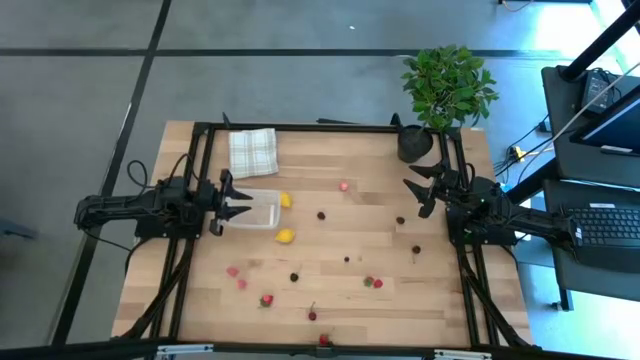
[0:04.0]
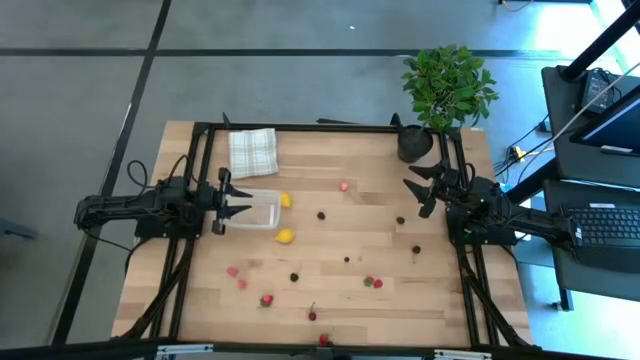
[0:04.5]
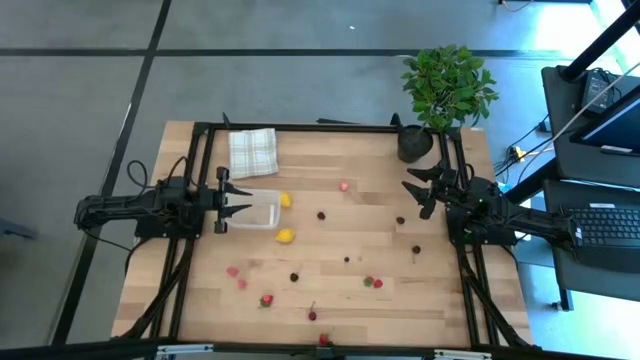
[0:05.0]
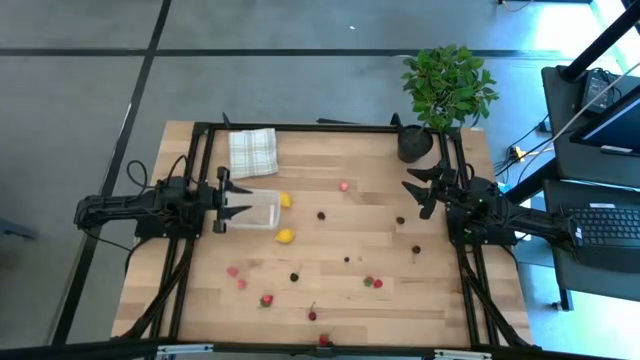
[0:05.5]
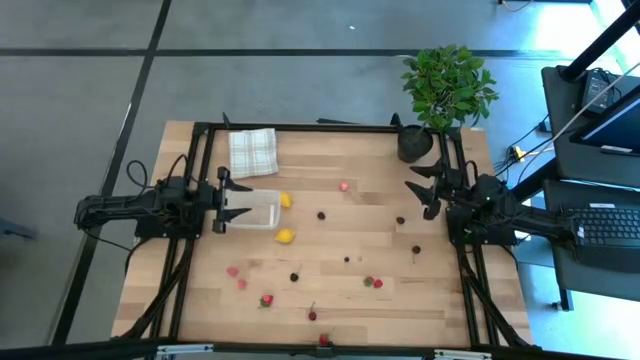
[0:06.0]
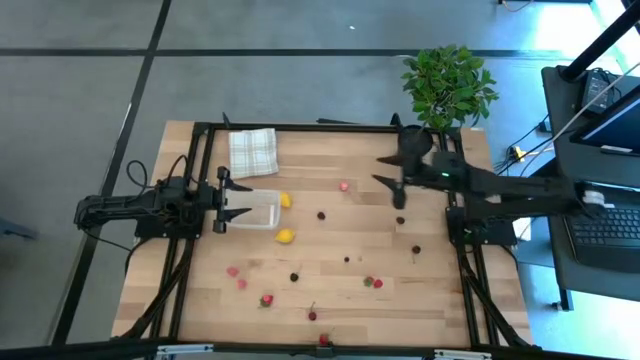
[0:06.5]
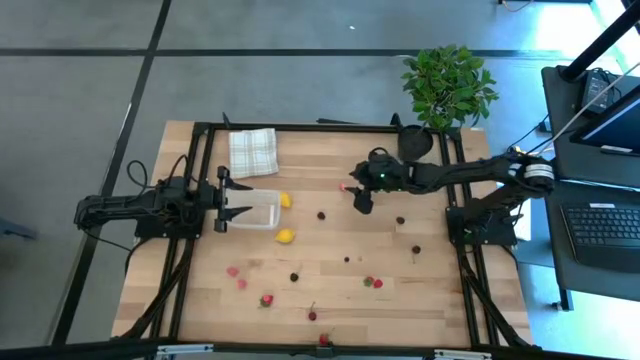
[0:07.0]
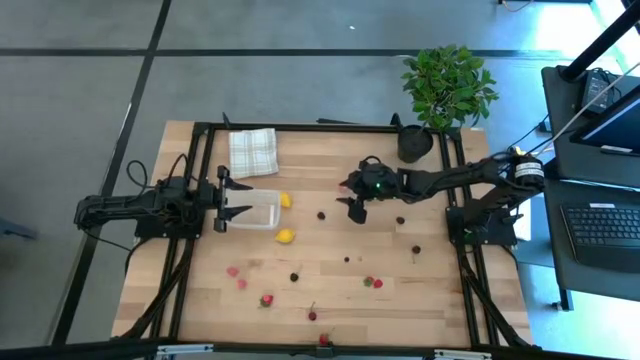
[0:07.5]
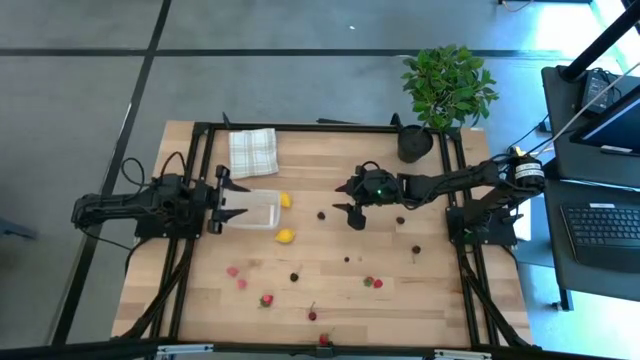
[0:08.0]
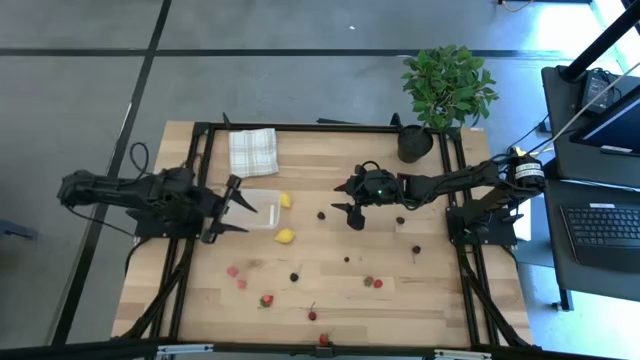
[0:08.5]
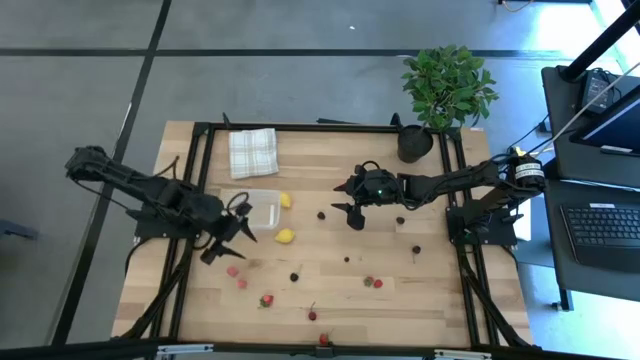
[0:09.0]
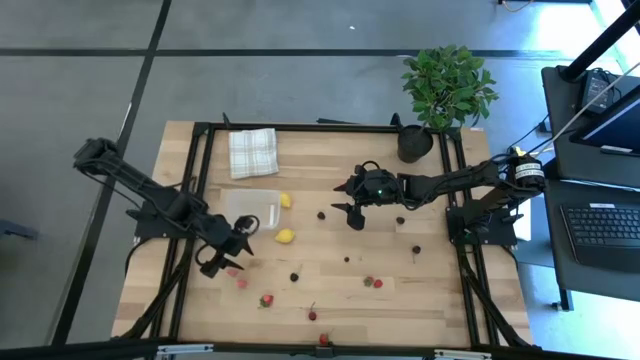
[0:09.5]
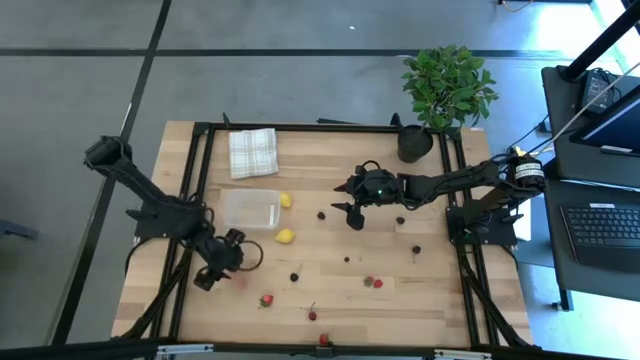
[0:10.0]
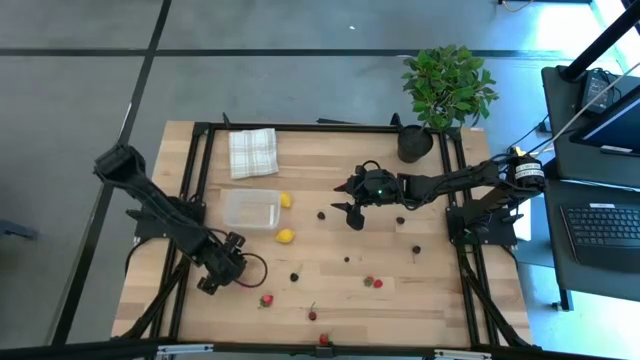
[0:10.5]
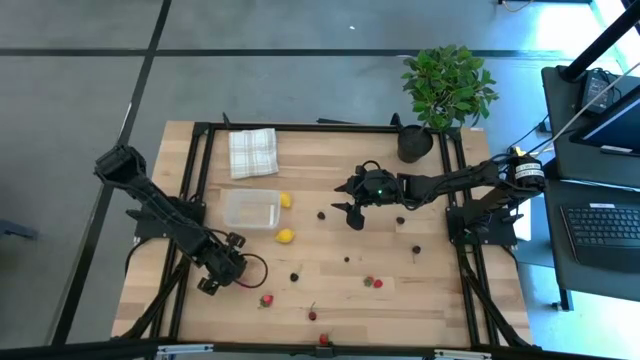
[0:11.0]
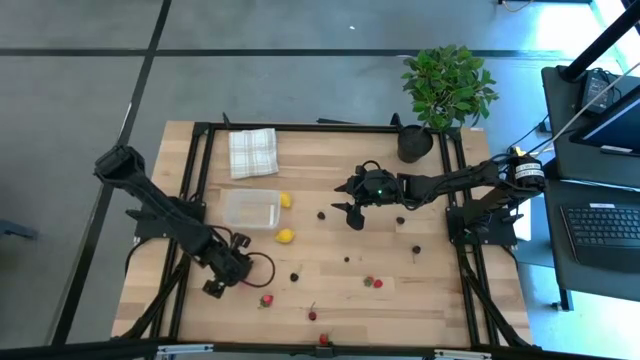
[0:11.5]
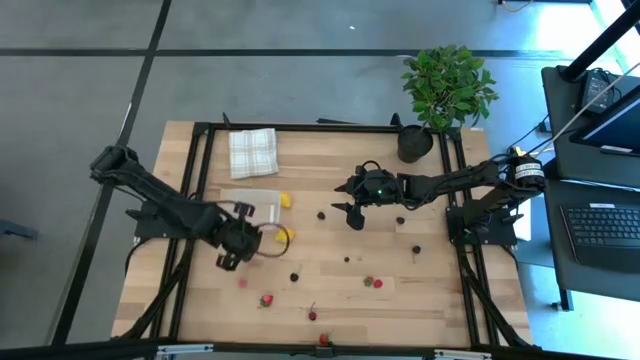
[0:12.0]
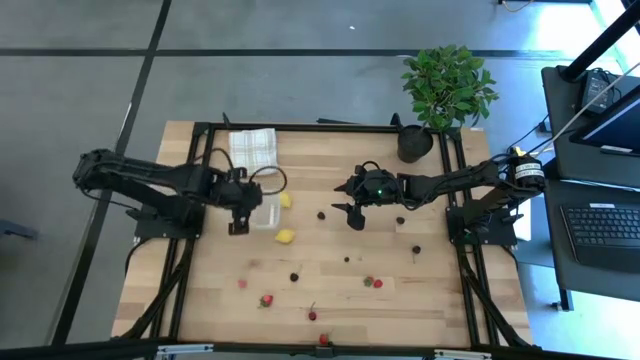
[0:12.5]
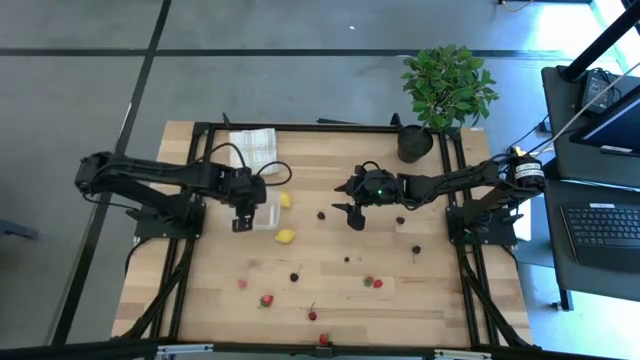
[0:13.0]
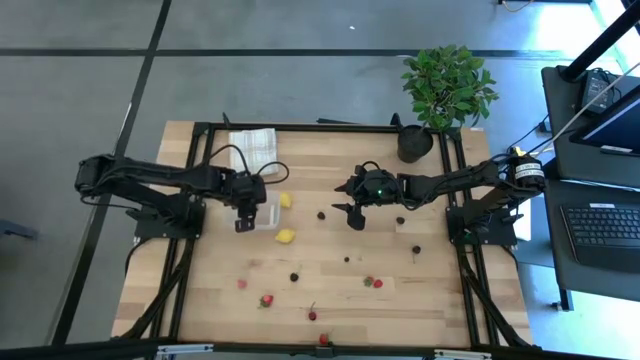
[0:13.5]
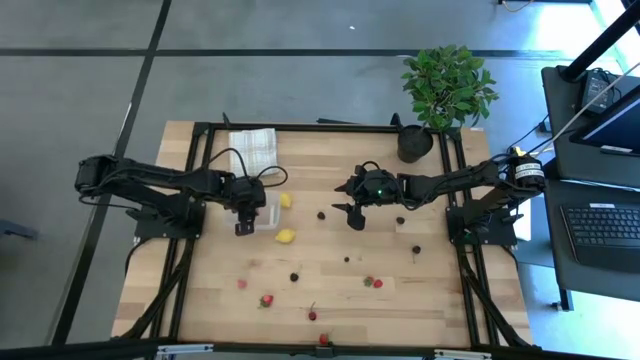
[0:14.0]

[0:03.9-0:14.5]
Task: Pick and placing Produce into tupperware
Put the bottom left pink peach into the transparent bin

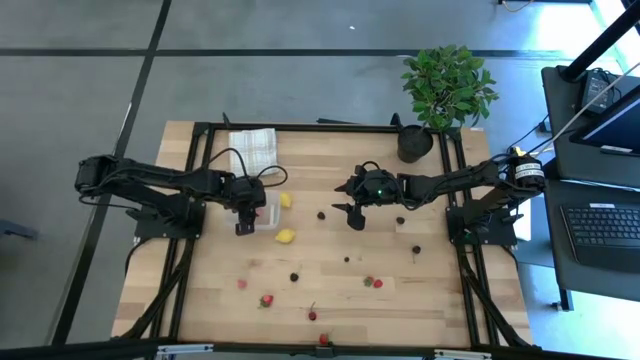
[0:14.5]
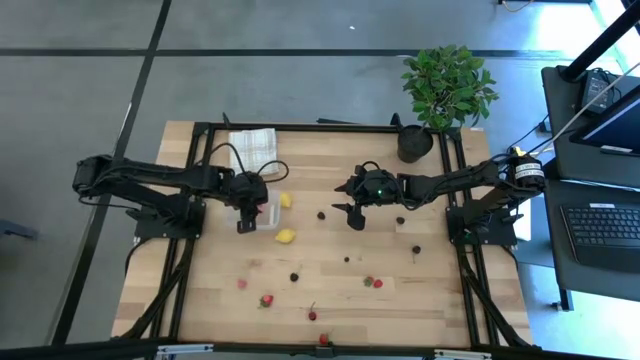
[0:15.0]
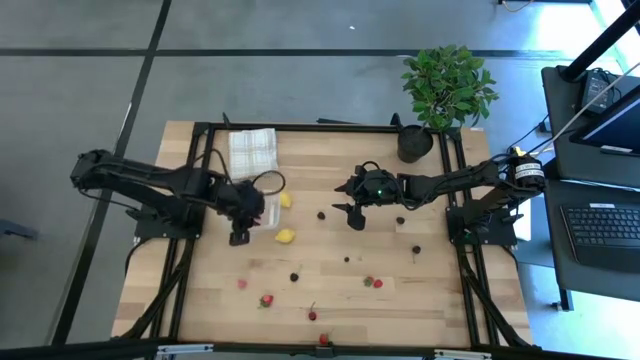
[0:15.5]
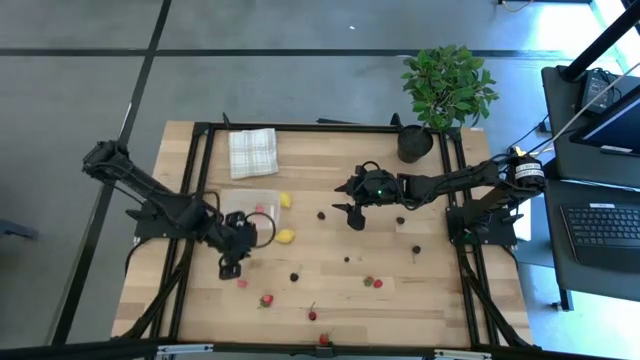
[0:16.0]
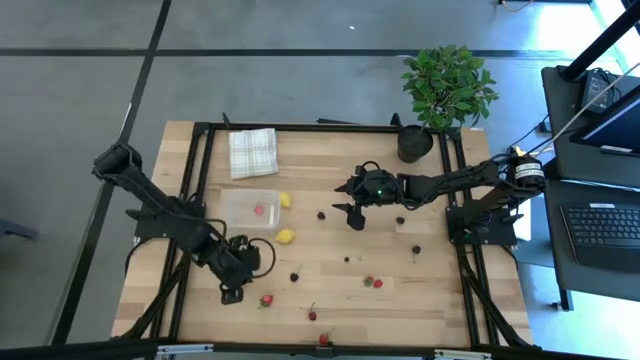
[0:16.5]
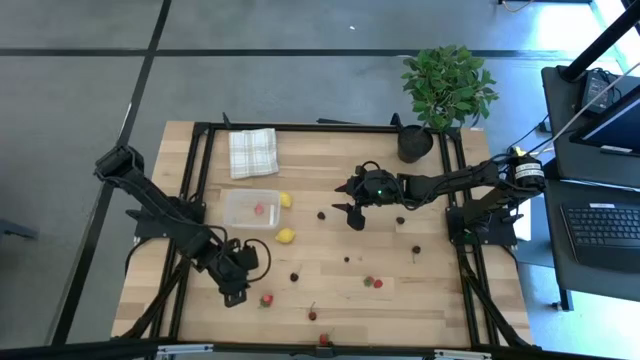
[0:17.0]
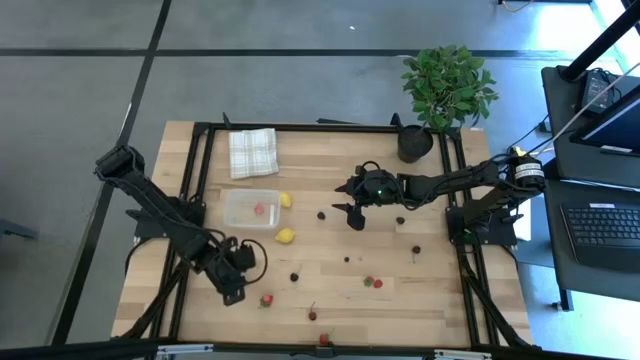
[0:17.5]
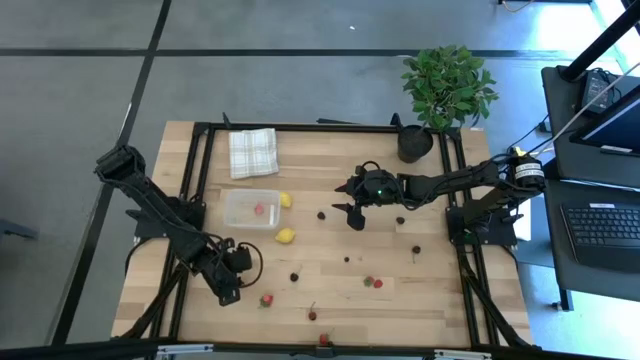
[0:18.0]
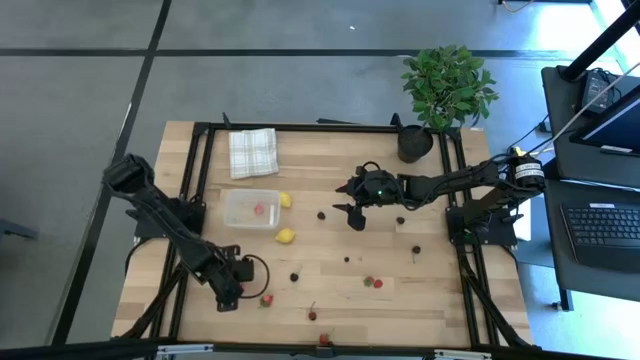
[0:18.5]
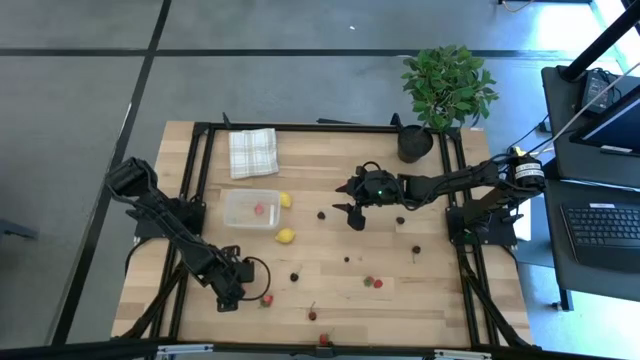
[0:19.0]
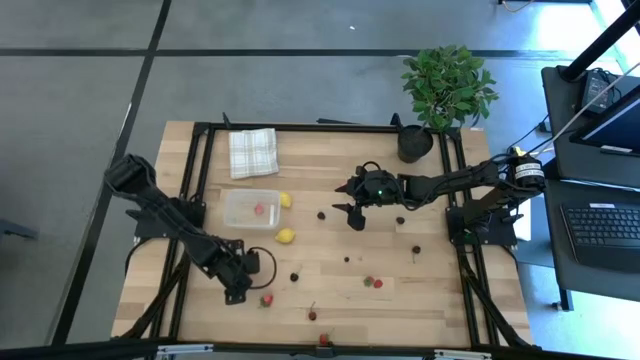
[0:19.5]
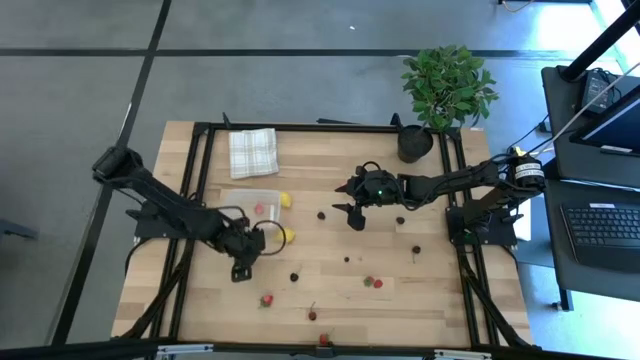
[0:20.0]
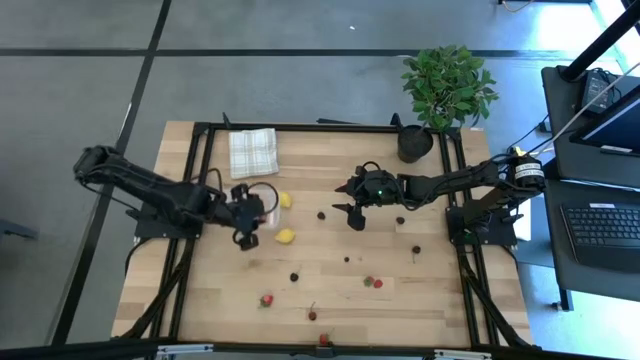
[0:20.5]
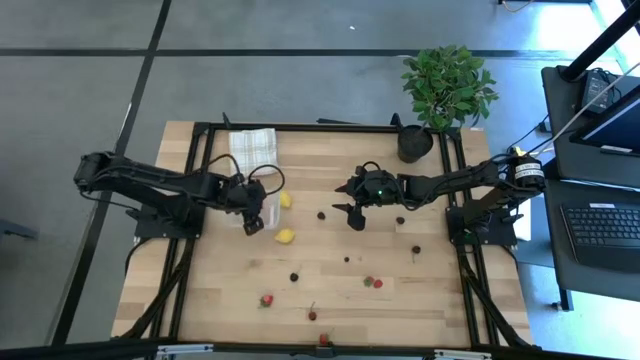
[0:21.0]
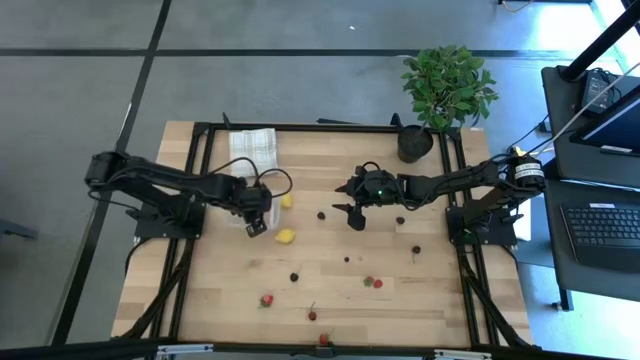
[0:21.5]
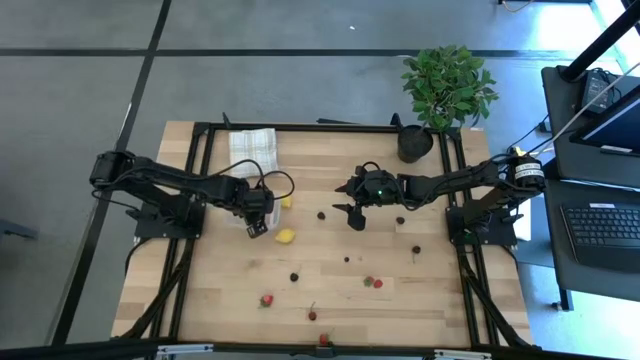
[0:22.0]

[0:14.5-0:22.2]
Put the bottom pink peach into the transparent bin

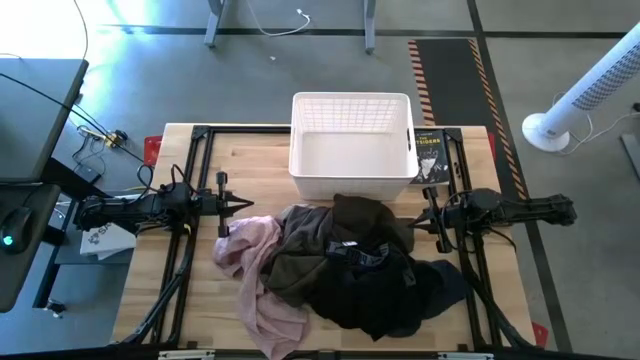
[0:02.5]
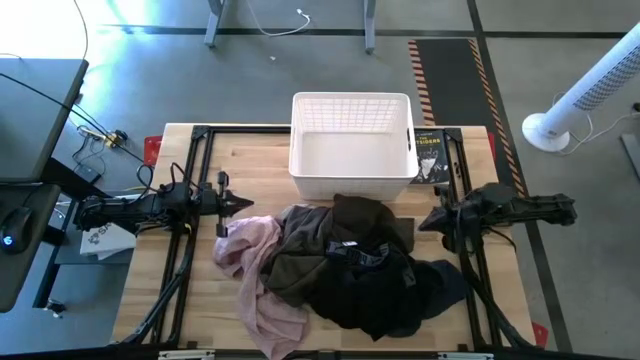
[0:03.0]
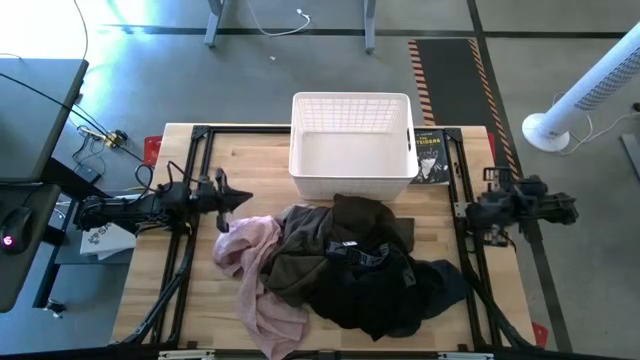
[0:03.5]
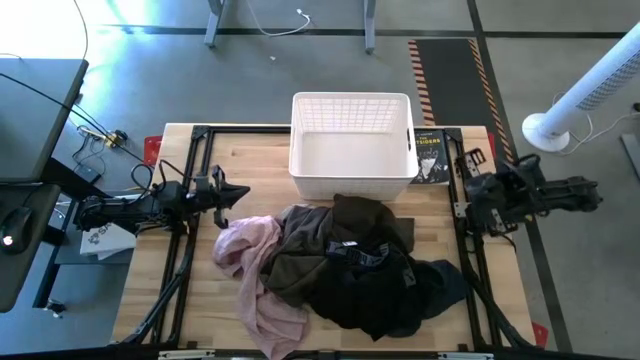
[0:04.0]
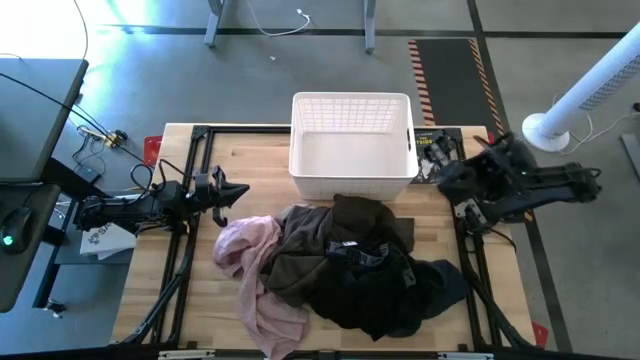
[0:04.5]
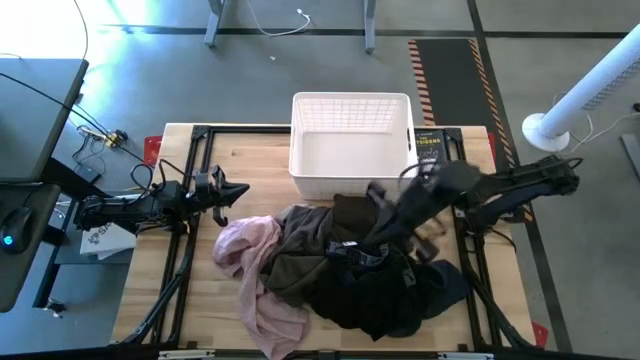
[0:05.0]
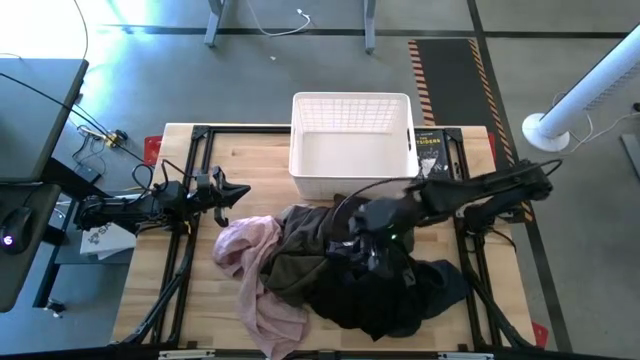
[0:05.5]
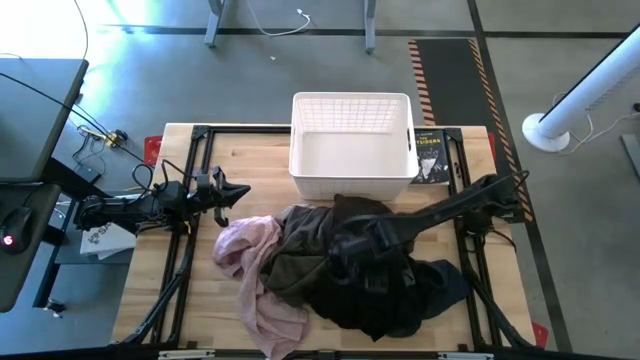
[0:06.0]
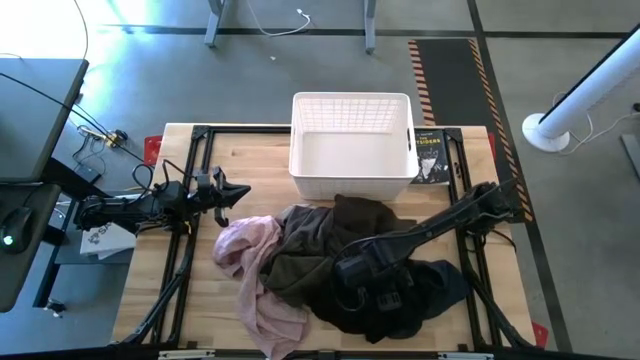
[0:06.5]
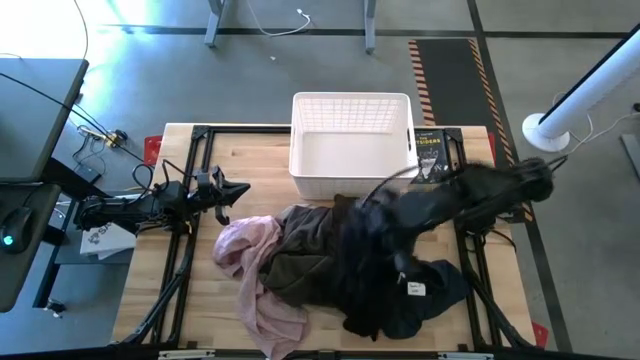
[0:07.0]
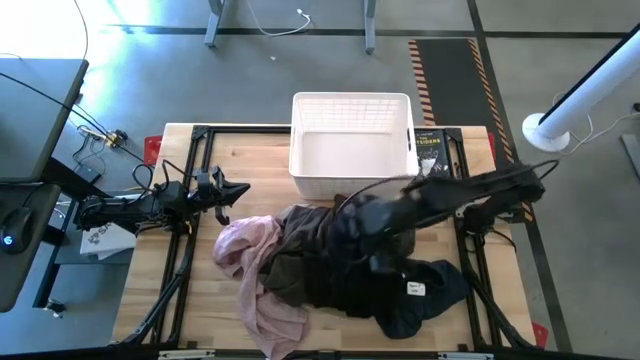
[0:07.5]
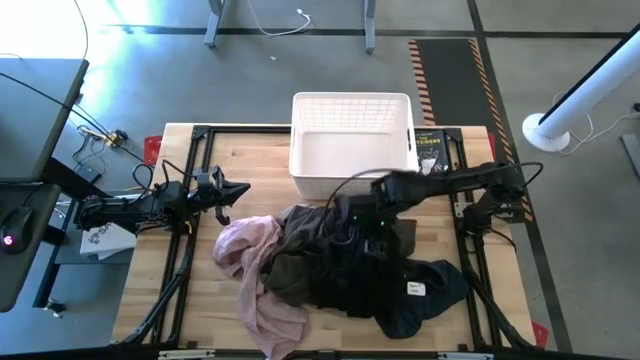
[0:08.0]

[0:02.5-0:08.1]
Task: Sort clothes
Put the black underwear into the laundry bin
